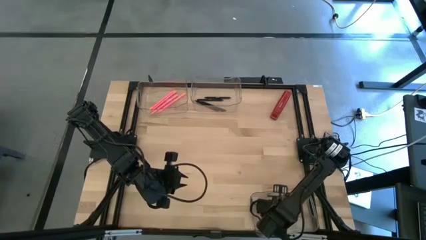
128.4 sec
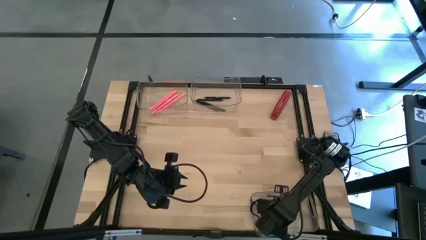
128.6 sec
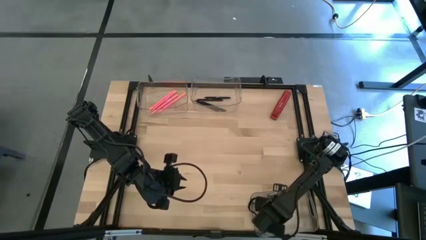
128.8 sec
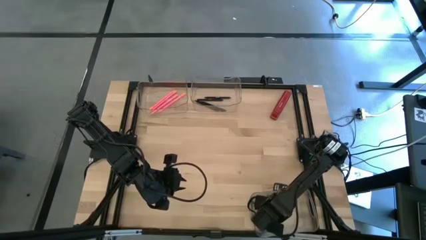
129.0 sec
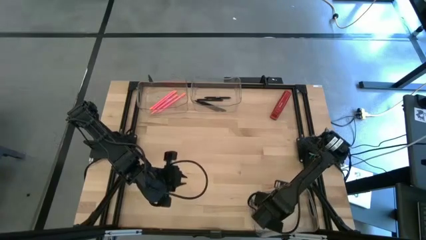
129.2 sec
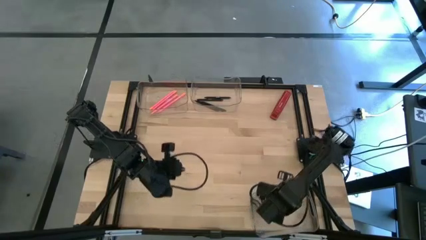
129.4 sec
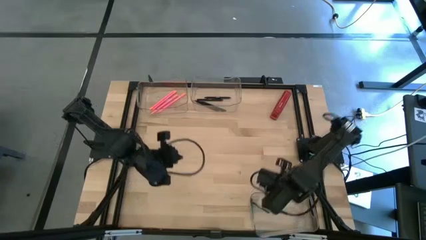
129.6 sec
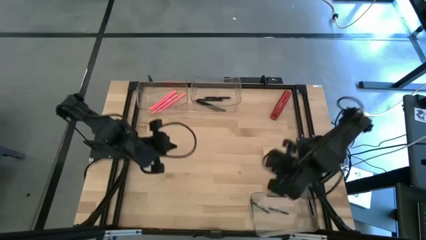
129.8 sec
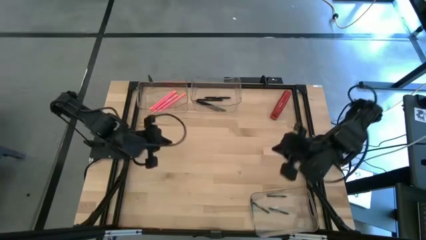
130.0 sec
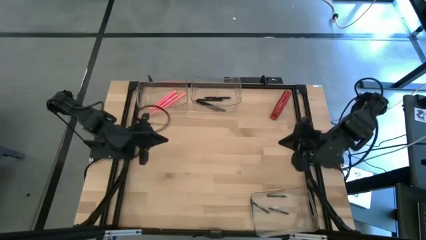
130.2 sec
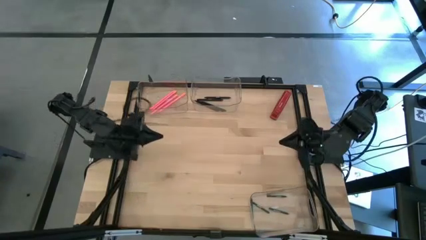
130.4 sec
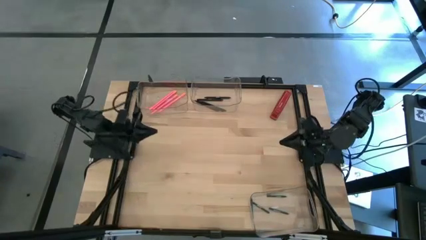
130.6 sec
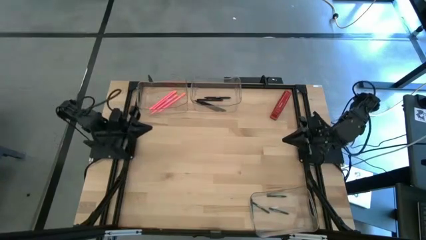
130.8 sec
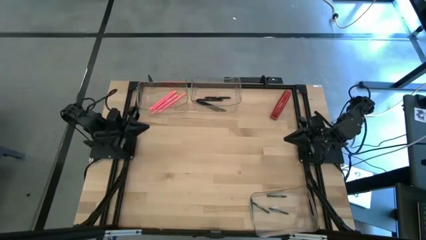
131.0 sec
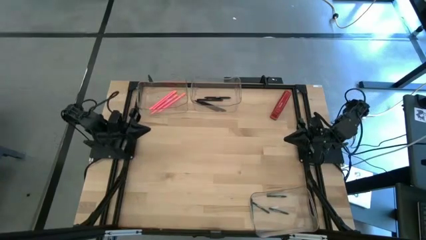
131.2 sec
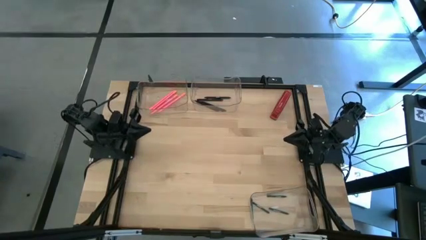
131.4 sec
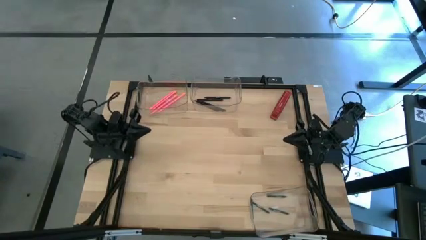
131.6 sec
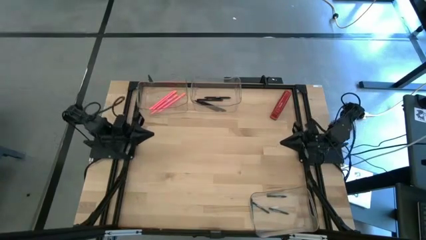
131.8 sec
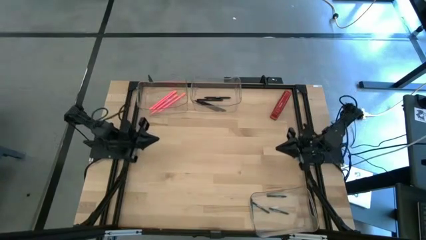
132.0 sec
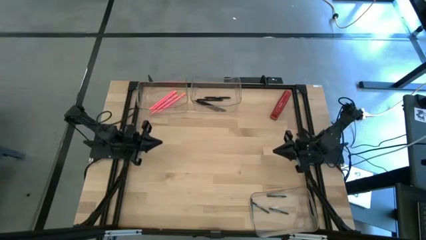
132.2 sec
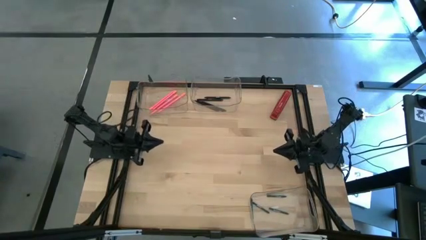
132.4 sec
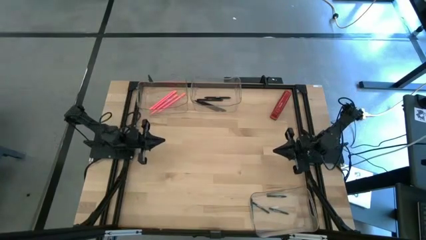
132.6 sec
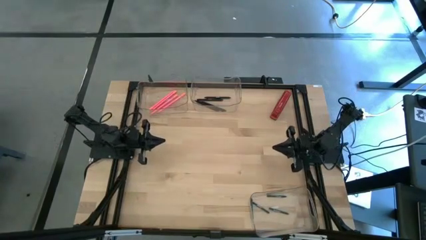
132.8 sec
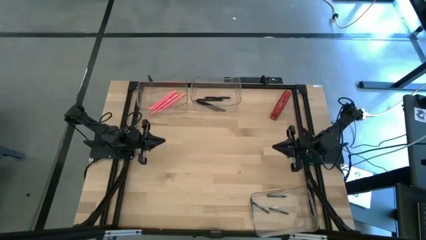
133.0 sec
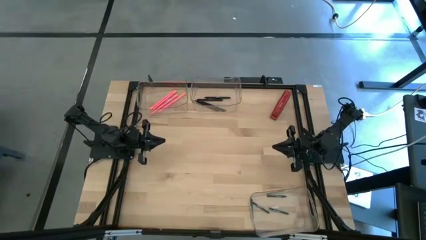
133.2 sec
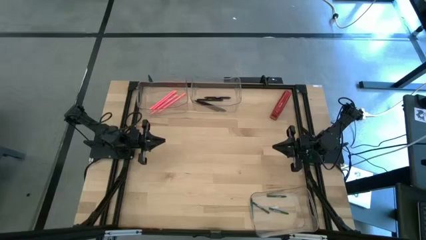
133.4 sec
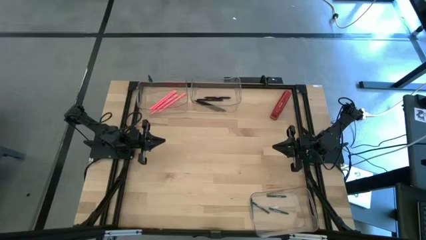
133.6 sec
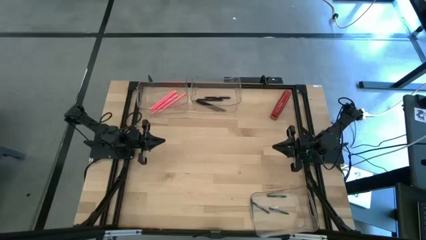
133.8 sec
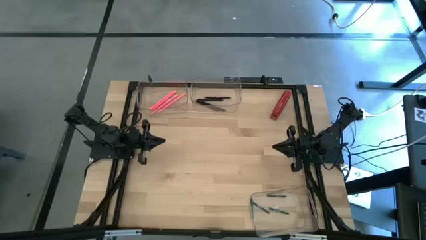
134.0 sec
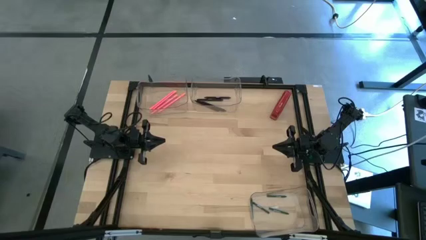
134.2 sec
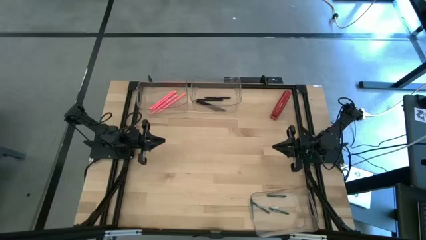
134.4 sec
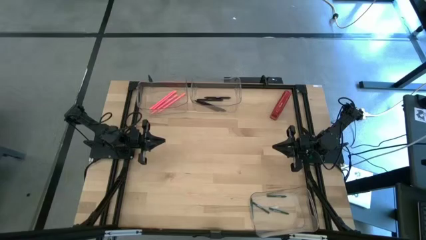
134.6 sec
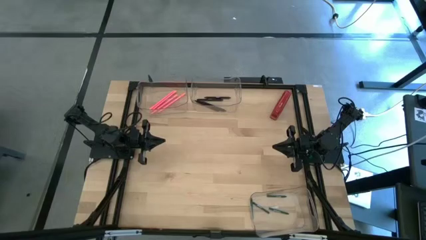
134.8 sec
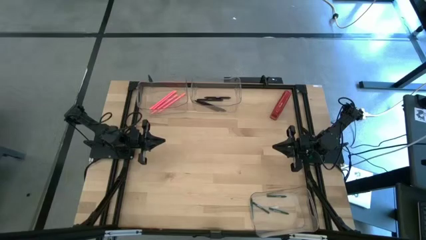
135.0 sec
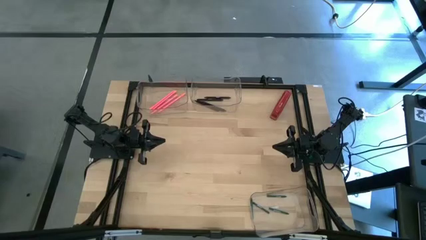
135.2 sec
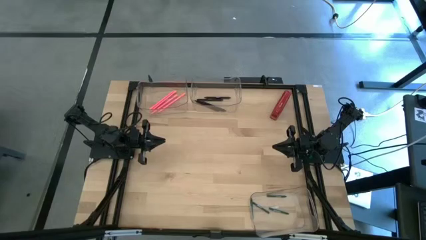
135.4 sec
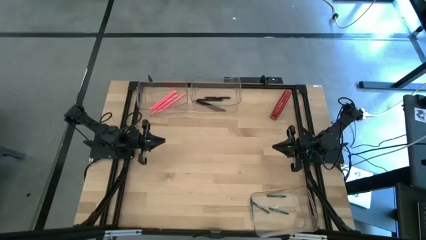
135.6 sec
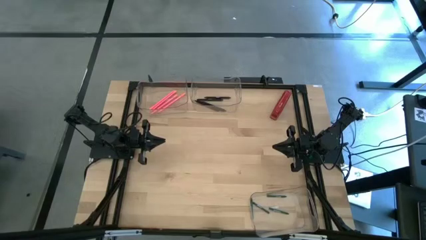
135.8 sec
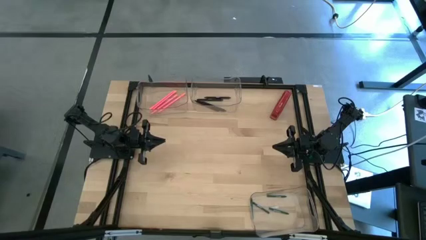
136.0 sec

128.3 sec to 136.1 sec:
Task: Sort crayons/erasers/pens/pencils in bins
Return to Home Position

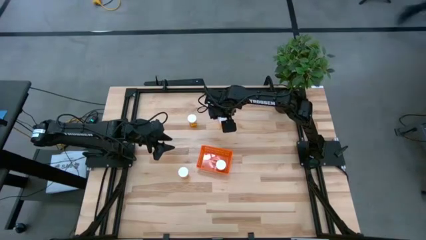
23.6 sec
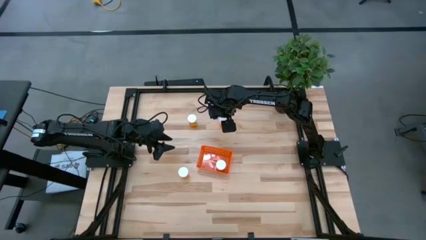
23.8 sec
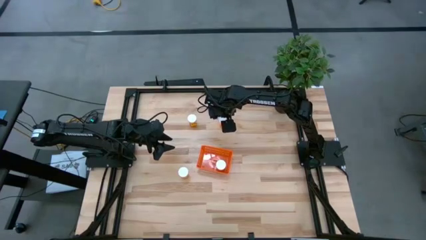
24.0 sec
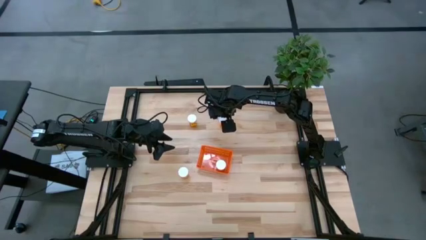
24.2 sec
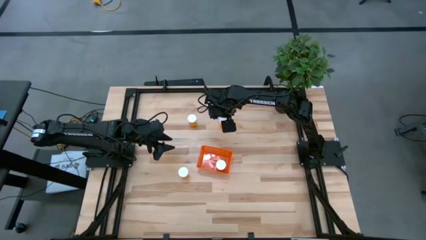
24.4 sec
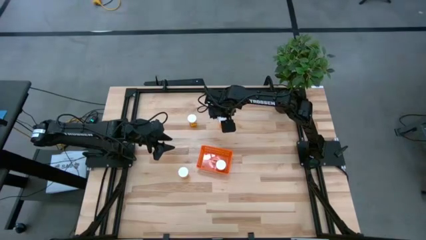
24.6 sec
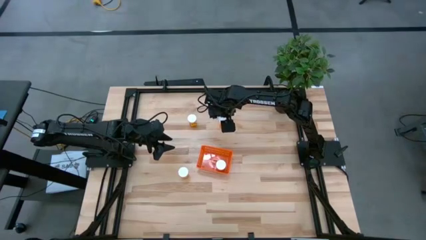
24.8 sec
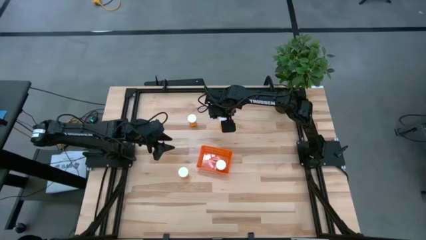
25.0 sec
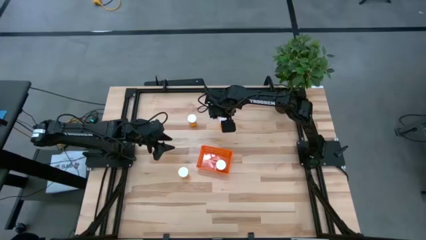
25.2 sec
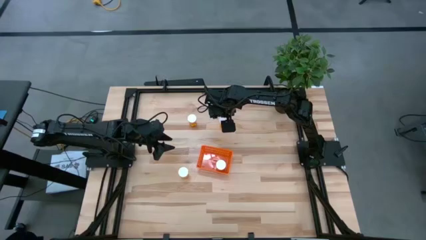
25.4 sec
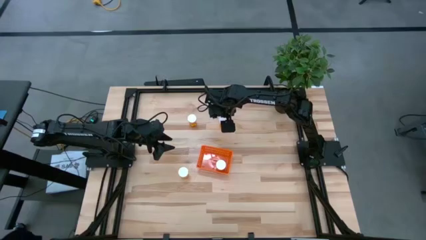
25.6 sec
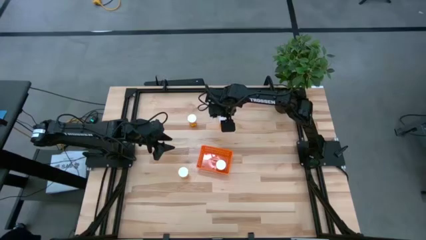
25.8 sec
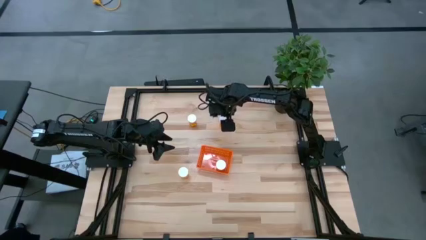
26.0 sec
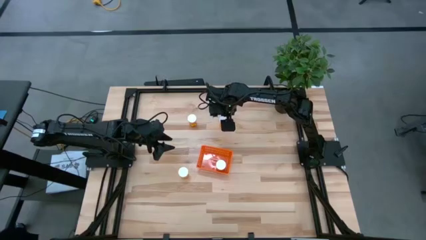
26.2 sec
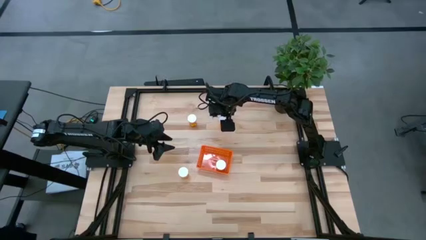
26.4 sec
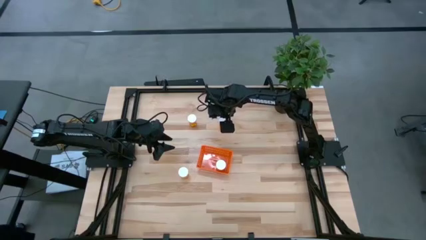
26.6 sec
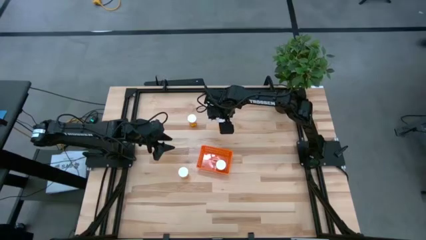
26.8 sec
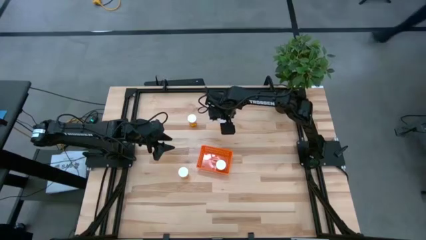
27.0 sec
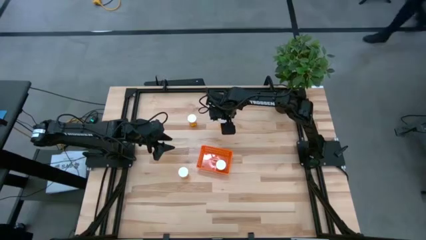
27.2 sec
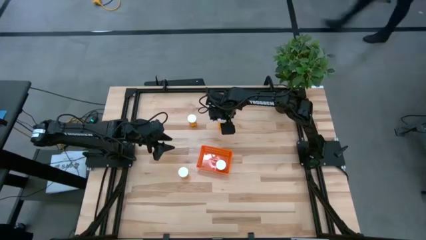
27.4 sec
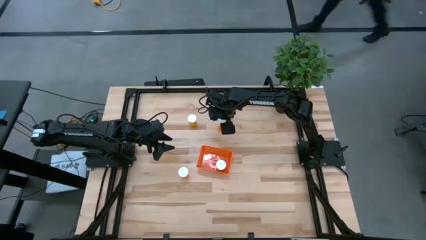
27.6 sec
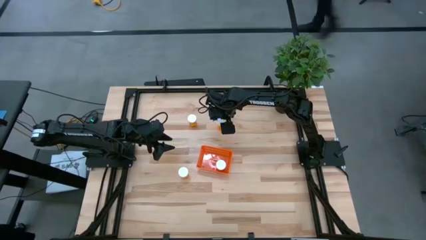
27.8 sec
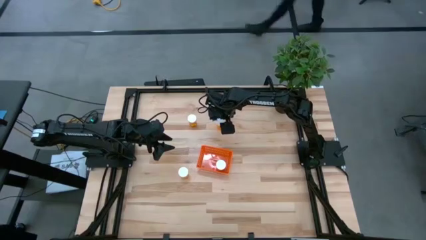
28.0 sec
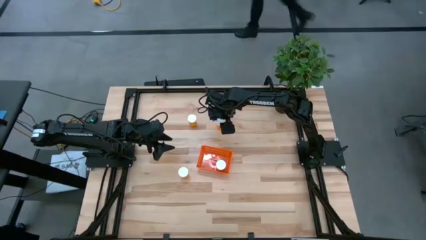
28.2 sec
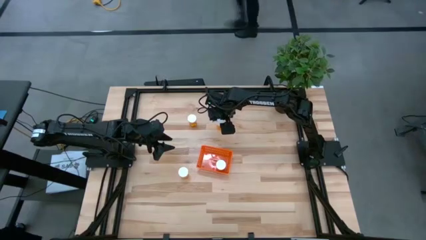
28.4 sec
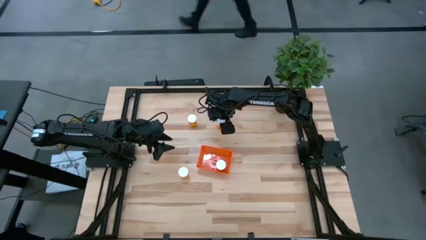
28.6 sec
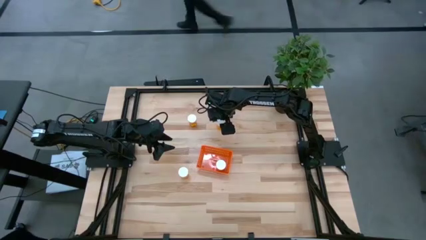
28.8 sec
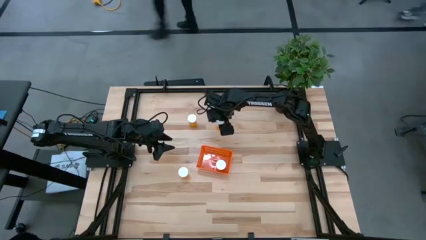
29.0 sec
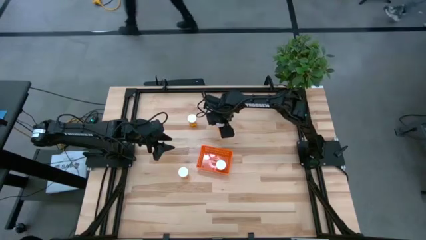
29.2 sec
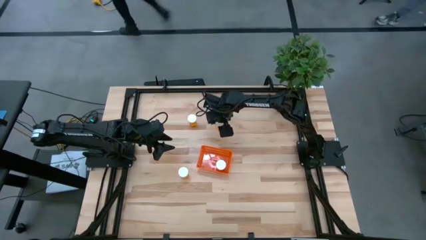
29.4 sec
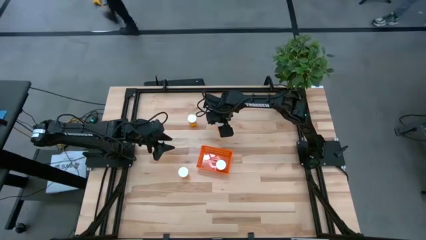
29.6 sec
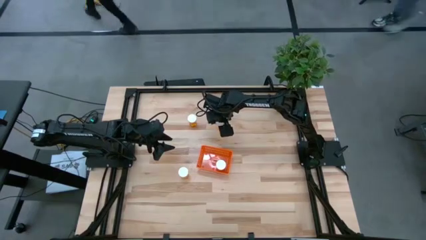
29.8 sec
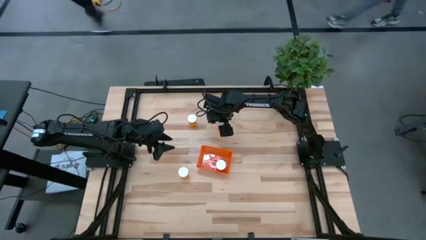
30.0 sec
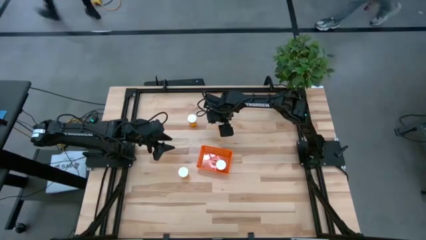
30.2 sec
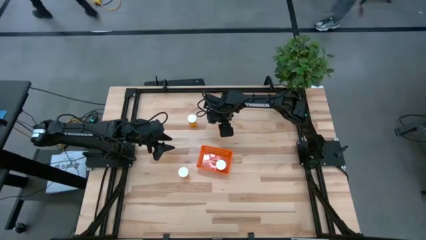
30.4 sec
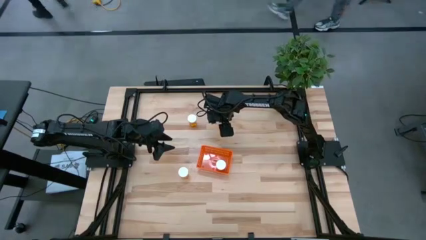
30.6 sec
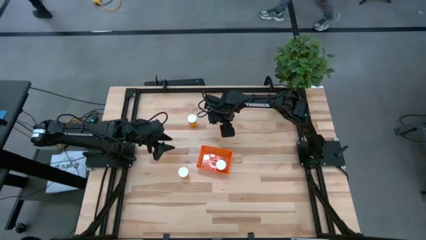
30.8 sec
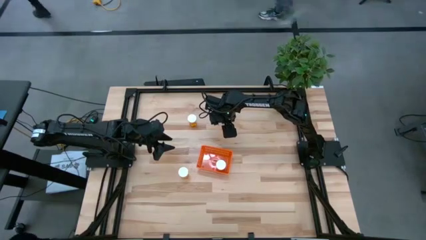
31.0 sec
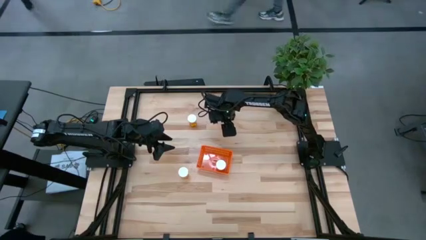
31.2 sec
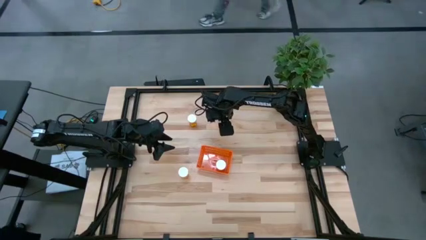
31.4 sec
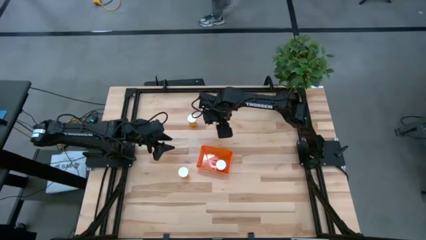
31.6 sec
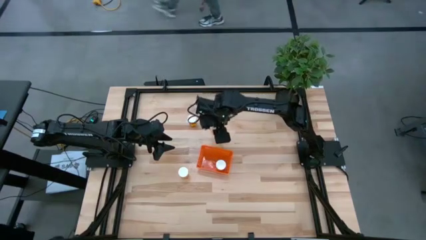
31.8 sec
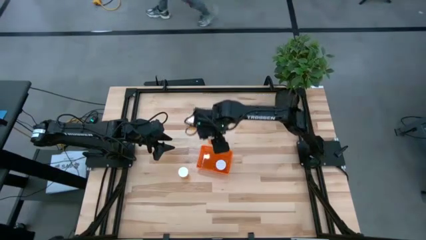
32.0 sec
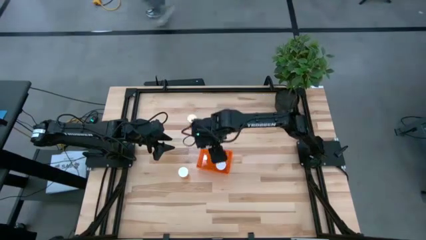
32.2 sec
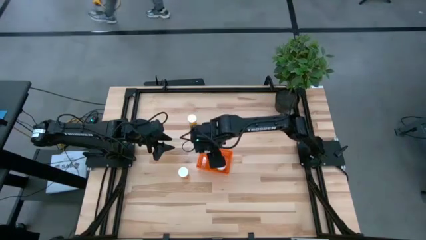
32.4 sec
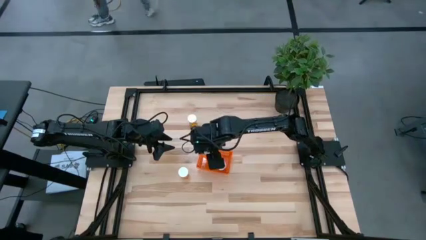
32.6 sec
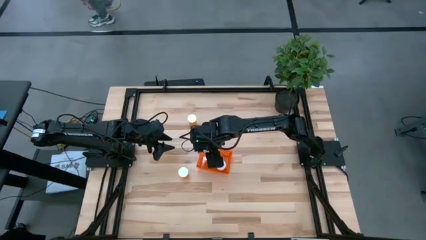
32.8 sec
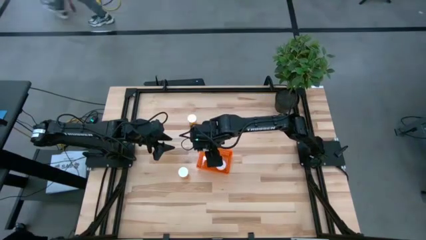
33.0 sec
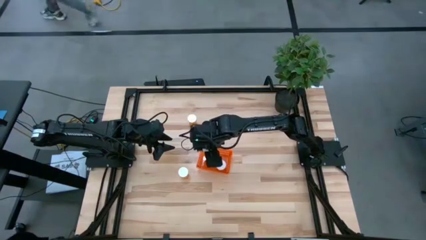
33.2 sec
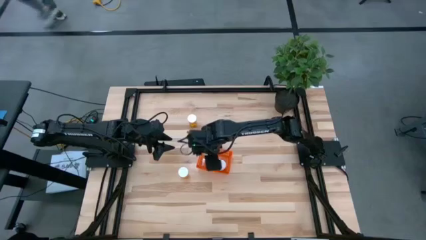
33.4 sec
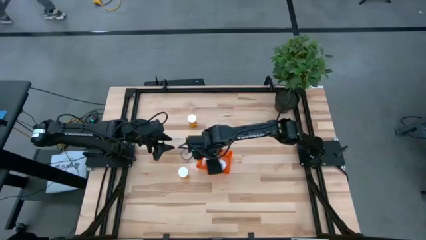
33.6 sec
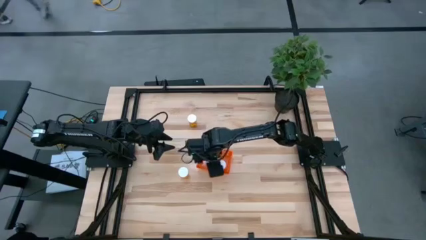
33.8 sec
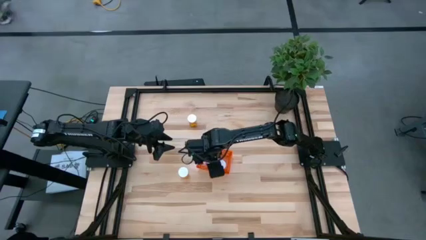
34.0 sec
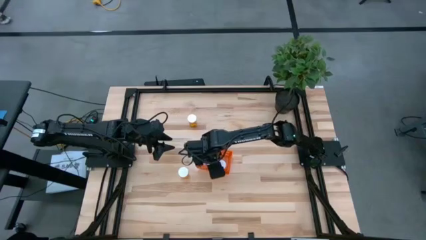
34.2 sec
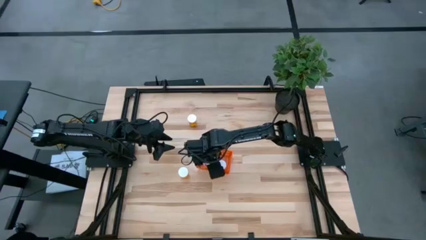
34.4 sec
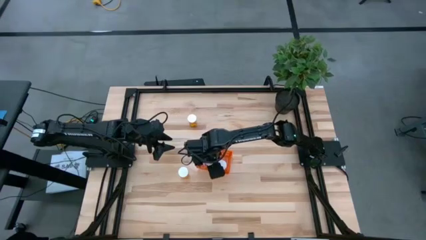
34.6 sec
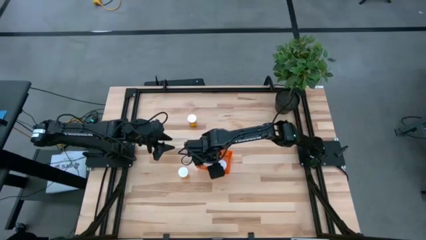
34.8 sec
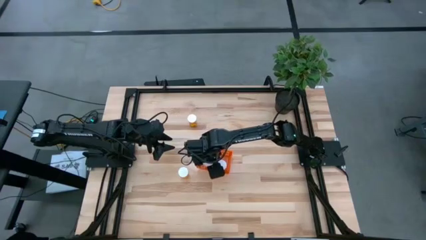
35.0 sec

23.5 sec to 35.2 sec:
Task: Pick and place pill bottles into a basket
Put the top right orange pill bottle into the orange bin
